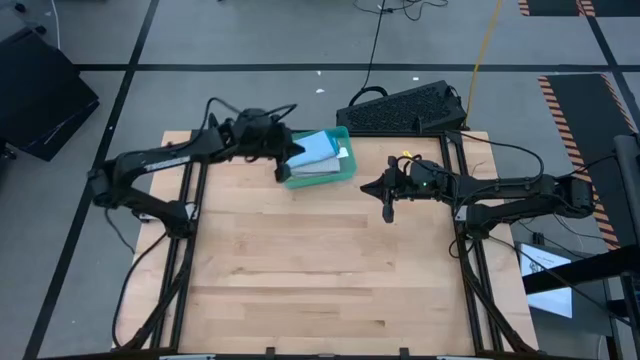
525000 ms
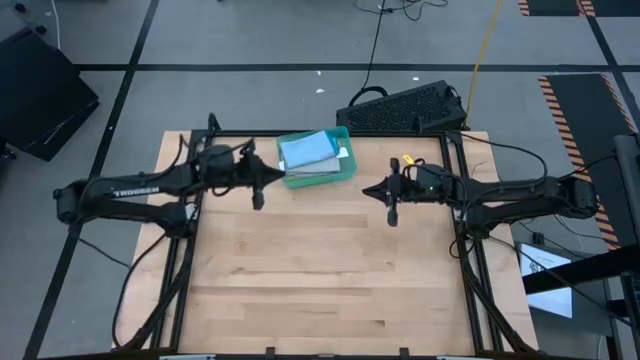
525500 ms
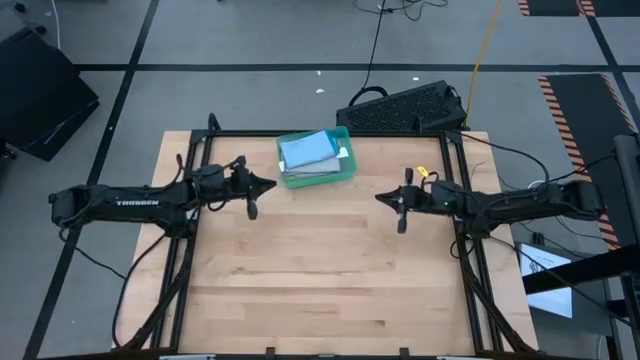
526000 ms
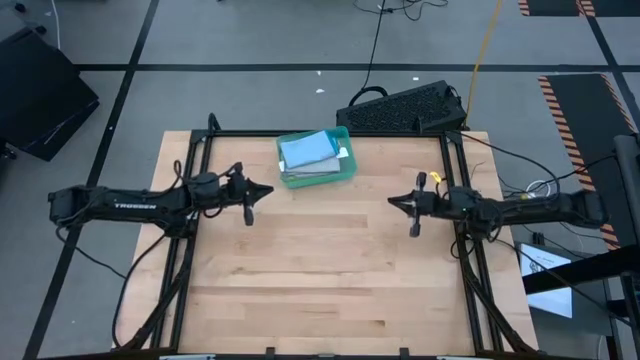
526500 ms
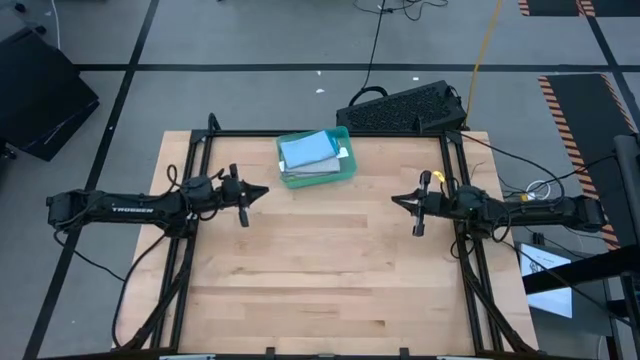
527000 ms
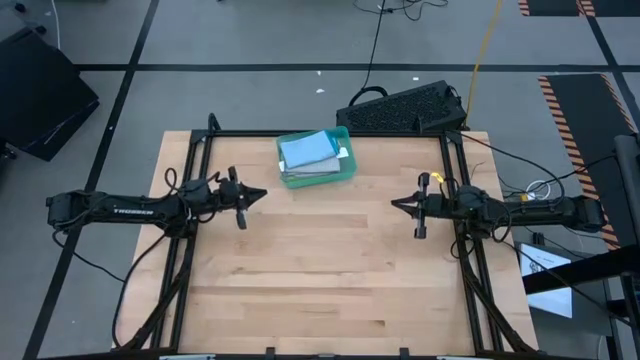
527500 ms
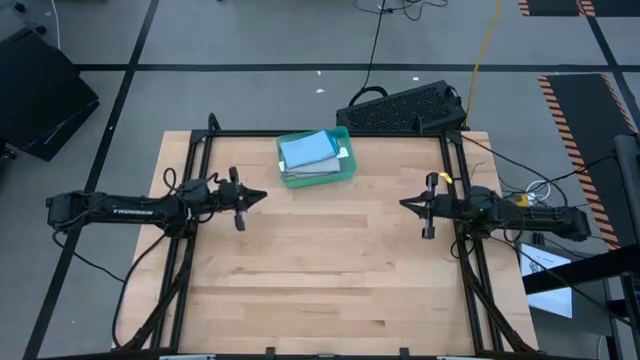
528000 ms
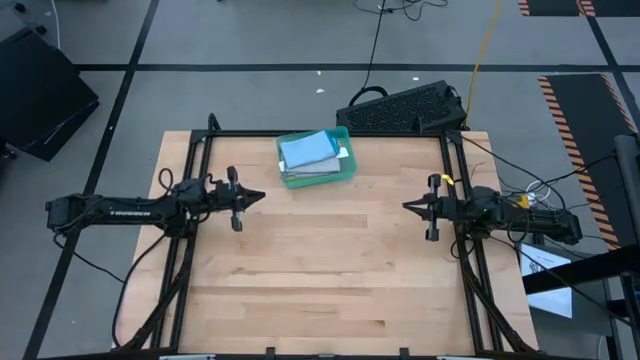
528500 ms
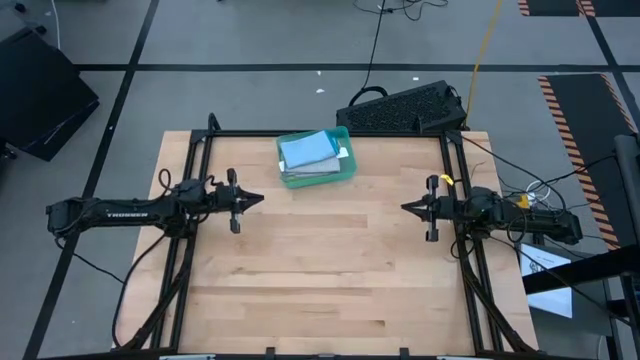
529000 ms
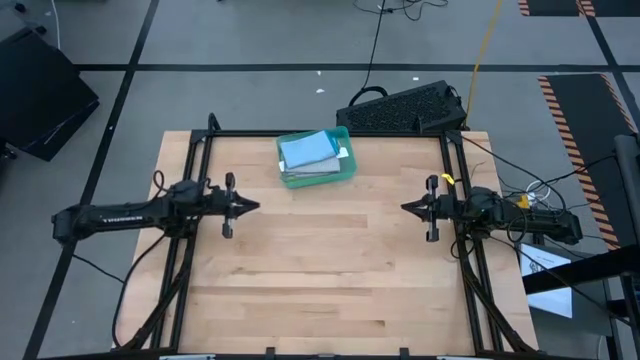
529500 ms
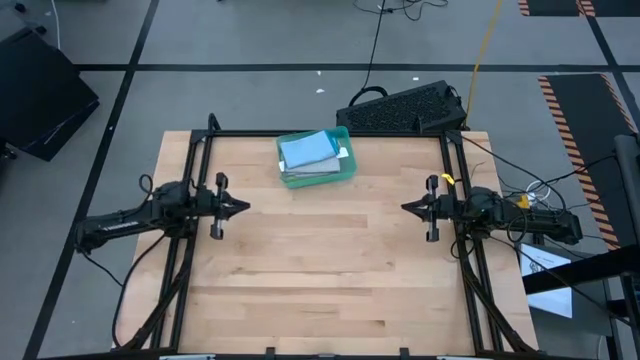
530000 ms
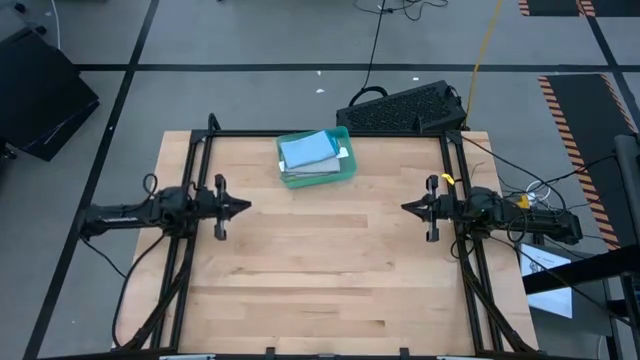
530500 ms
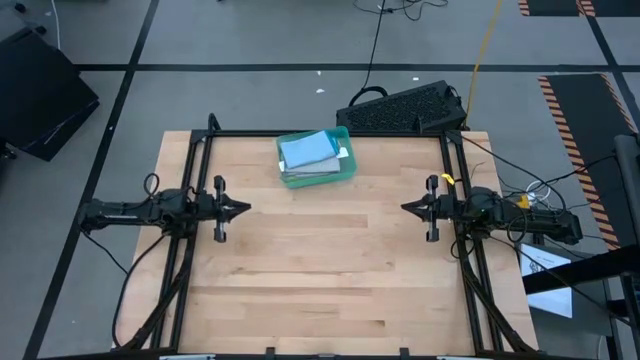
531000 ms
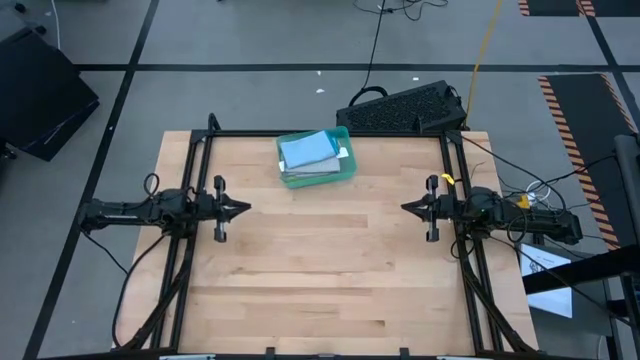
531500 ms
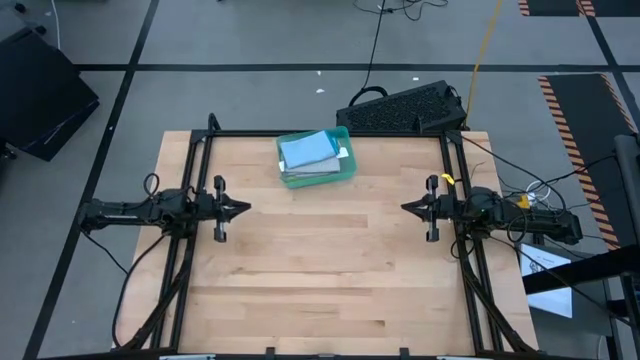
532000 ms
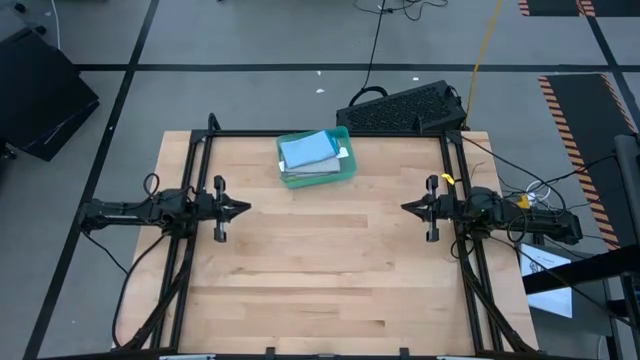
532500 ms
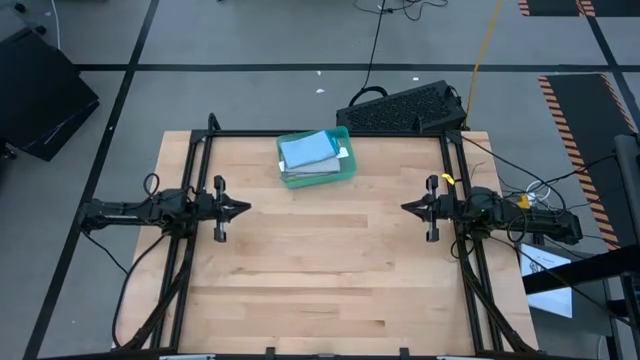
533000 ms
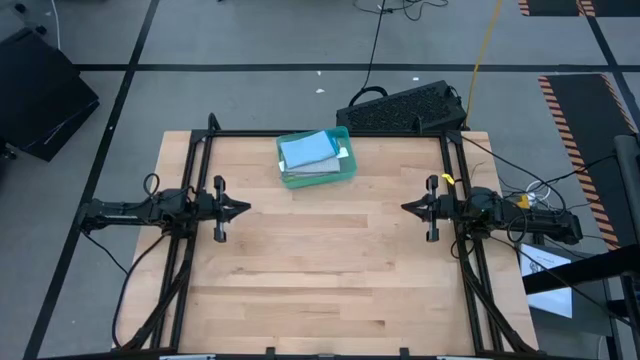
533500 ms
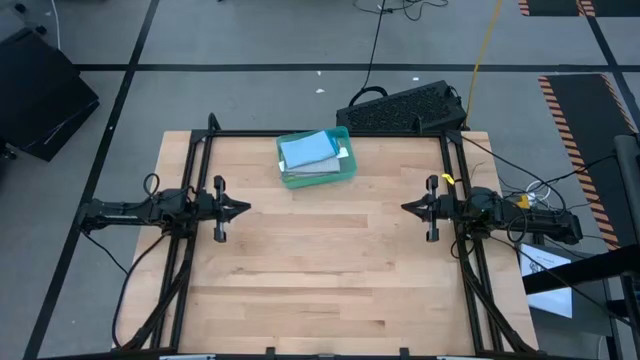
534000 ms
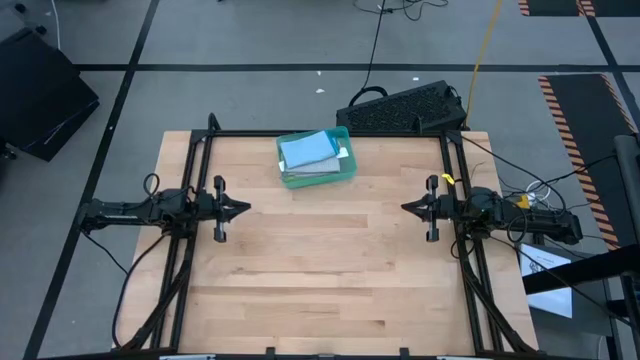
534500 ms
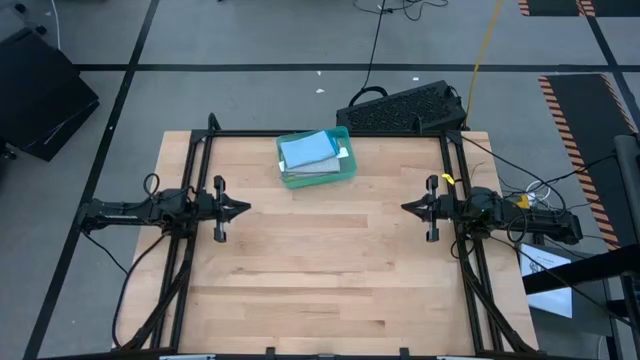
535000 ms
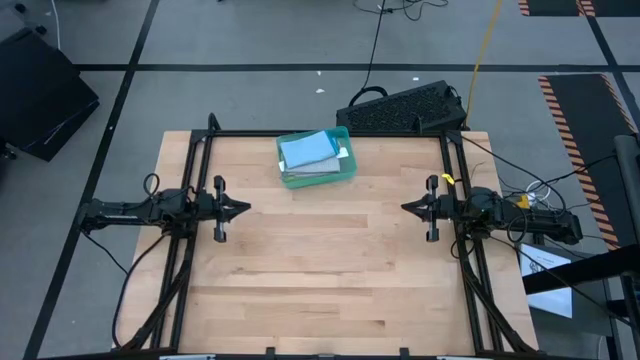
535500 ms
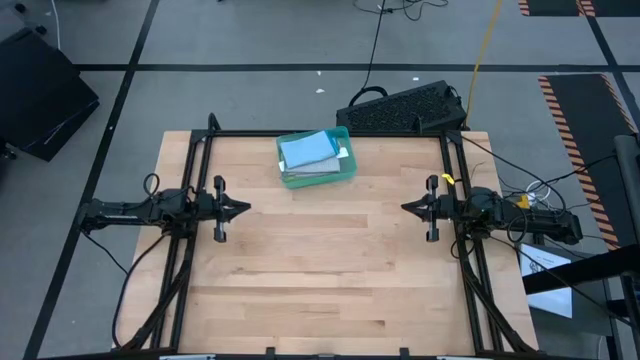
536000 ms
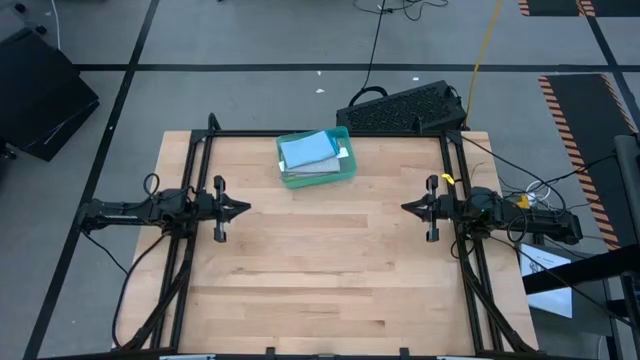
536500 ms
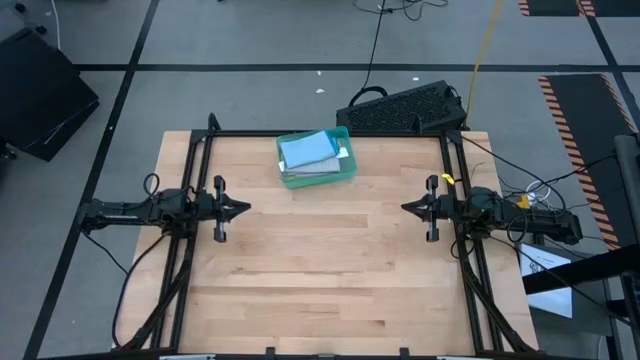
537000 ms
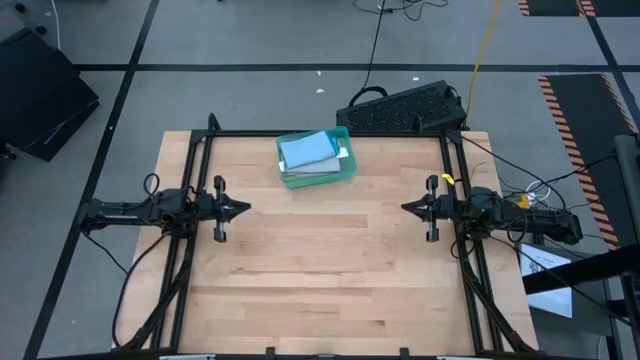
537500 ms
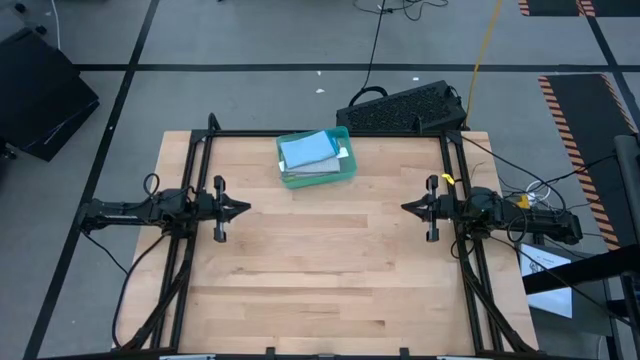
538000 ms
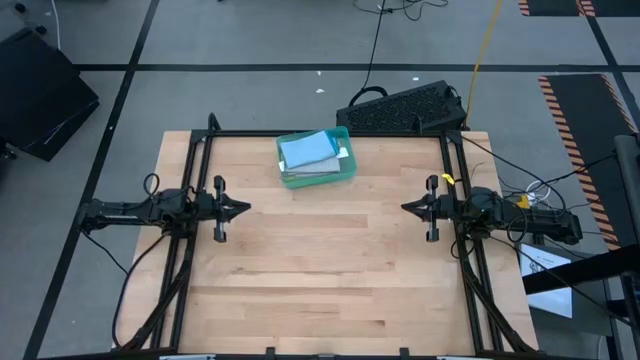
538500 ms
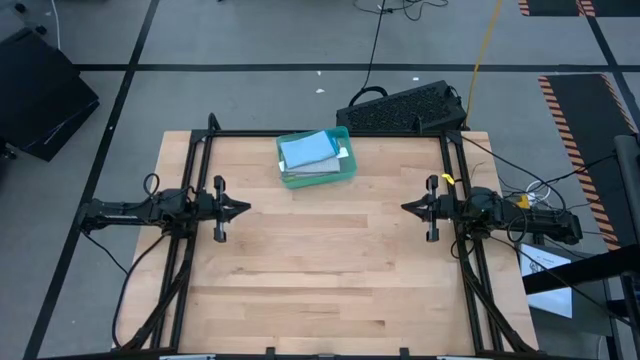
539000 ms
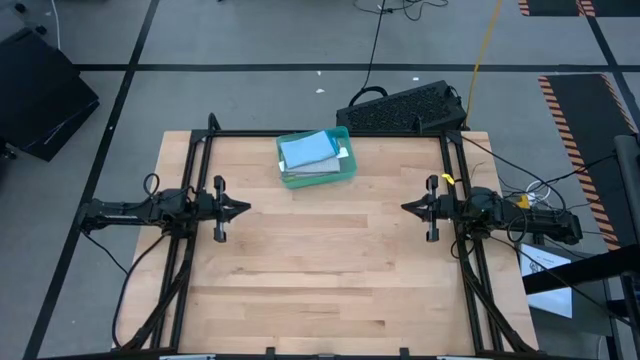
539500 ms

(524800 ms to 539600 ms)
Task: Fold microfiber towels
Return to Home Position

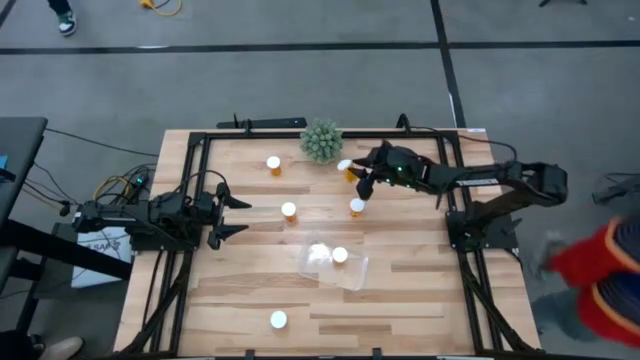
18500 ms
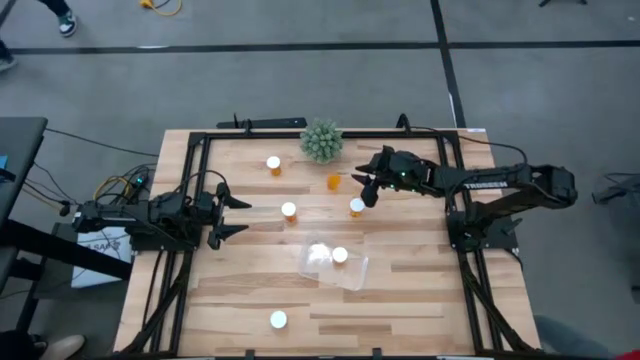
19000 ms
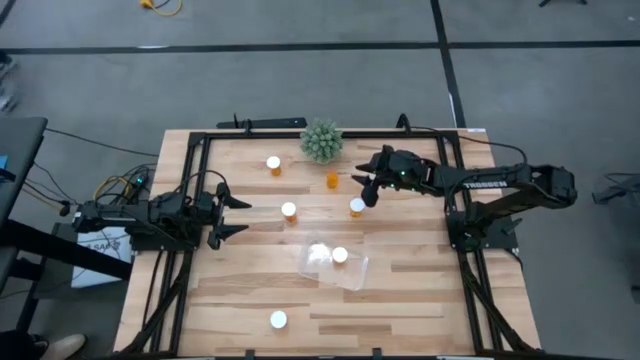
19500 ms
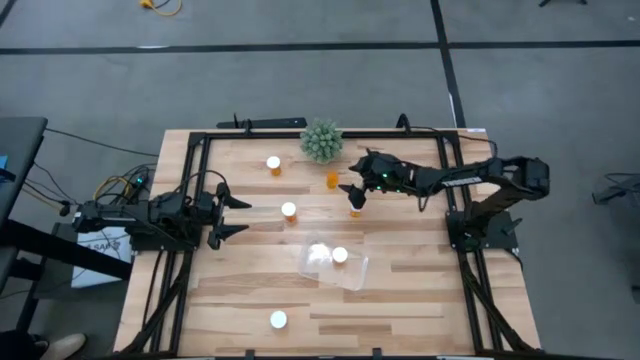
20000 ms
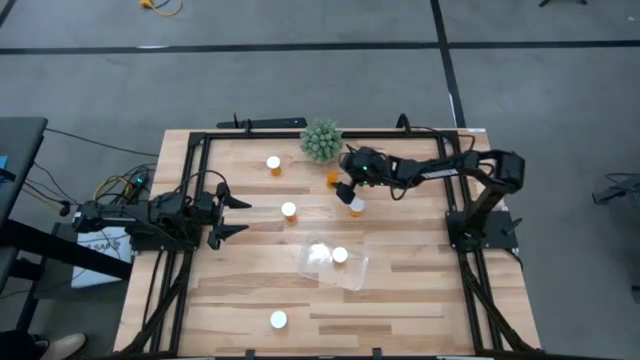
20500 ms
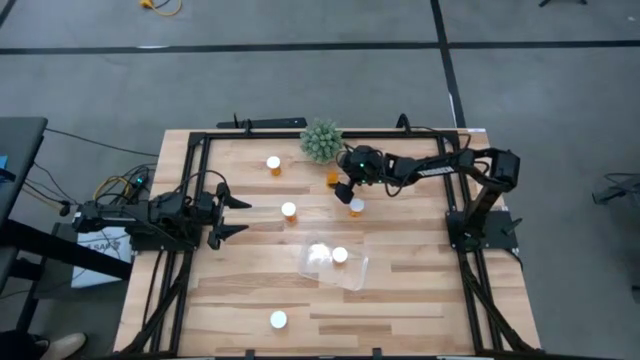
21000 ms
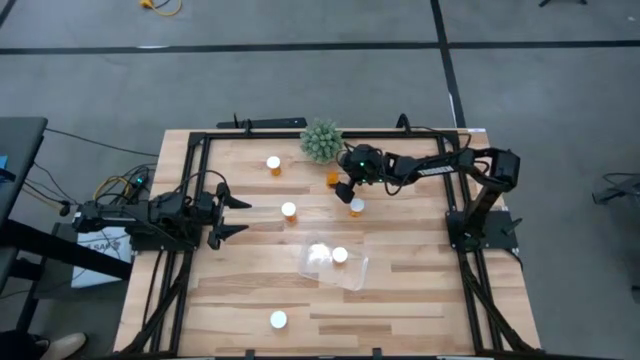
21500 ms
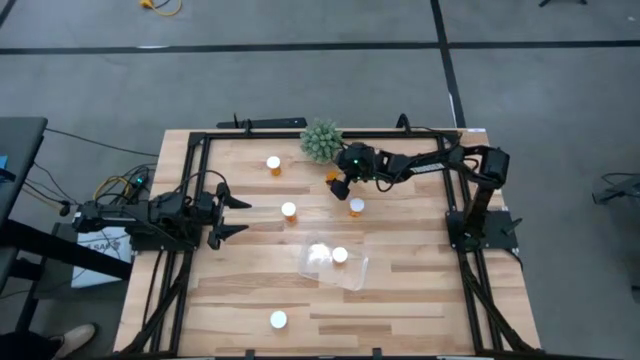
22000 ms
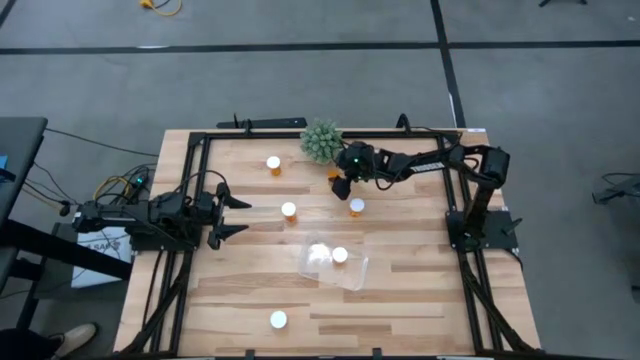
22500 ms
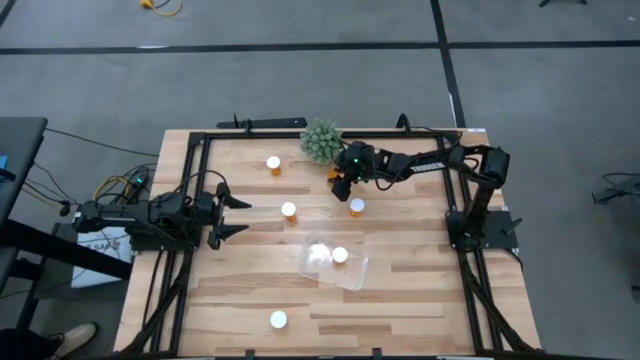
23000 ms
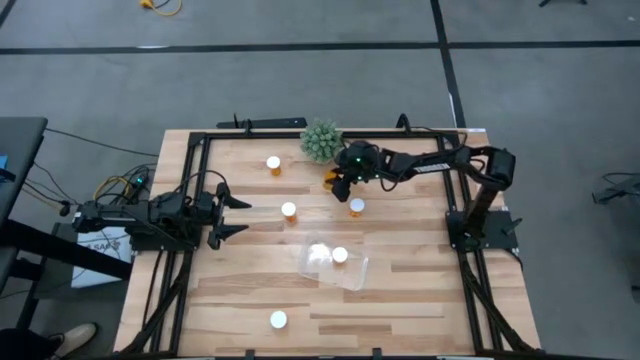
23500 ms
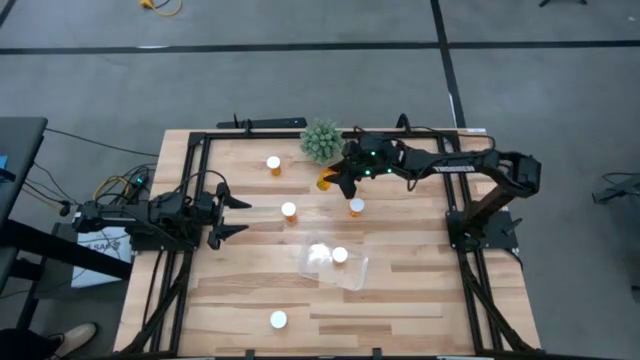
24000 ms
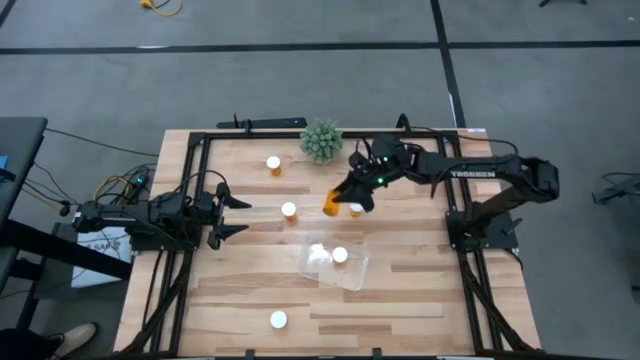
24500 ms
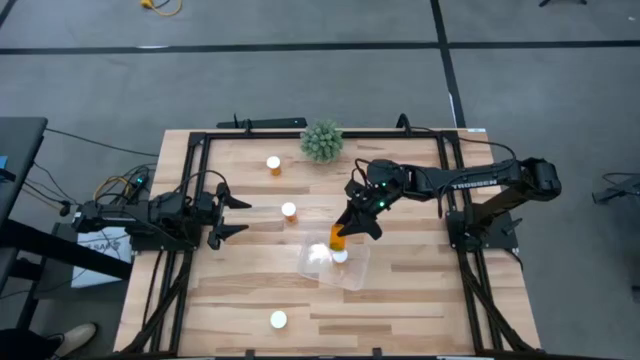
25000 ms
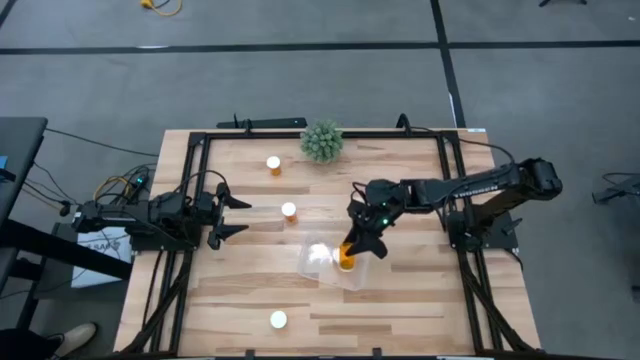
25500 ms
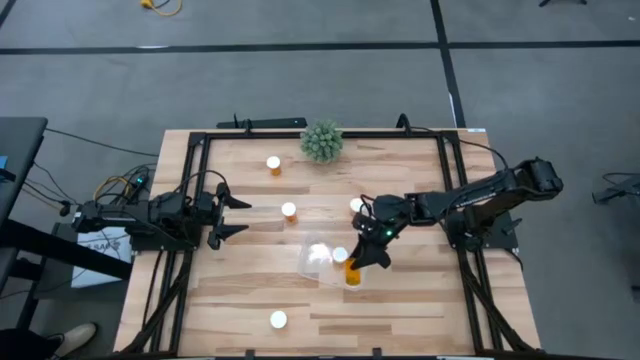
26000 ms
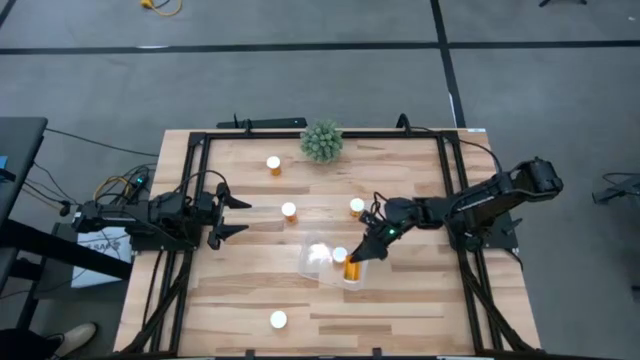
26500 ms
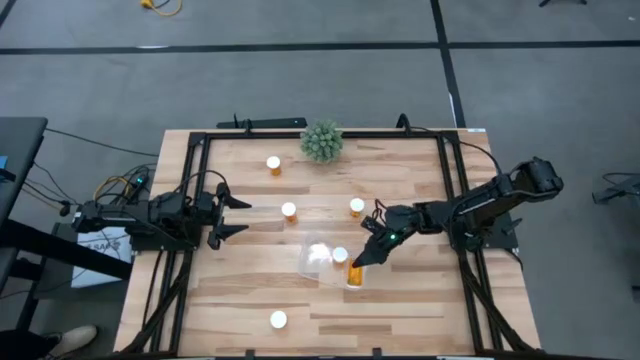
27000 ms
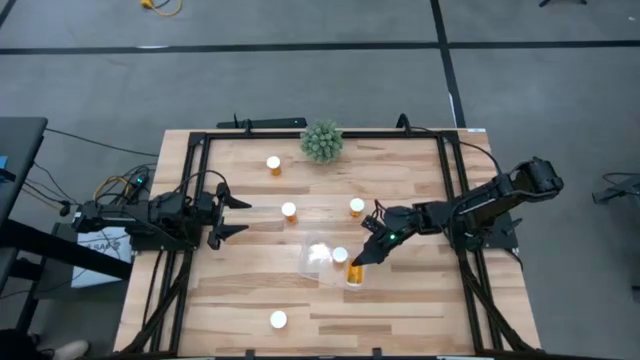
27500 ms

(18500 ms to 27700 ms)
Task: Pick and place pill bottles into a basket
Put the orange pill bottle into the transparent bin
